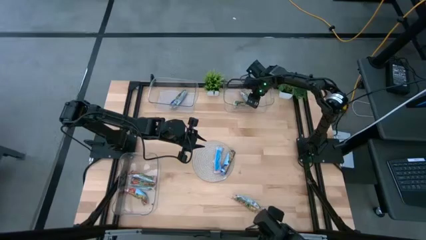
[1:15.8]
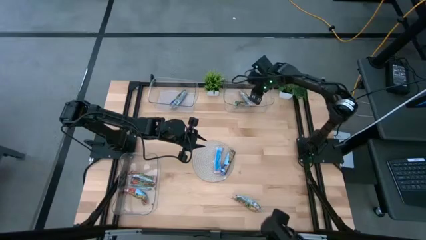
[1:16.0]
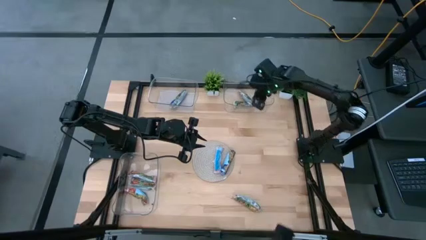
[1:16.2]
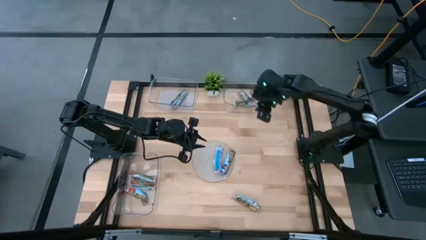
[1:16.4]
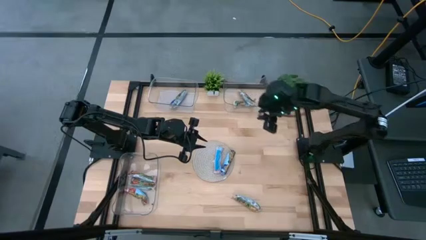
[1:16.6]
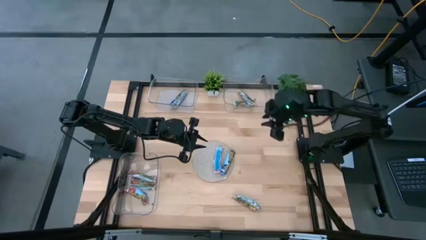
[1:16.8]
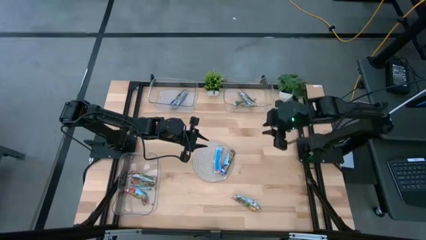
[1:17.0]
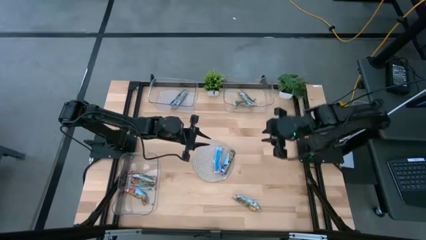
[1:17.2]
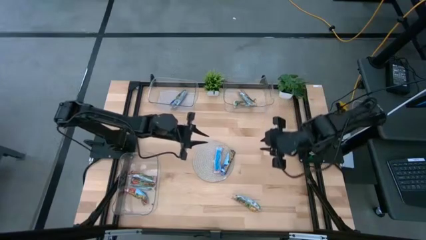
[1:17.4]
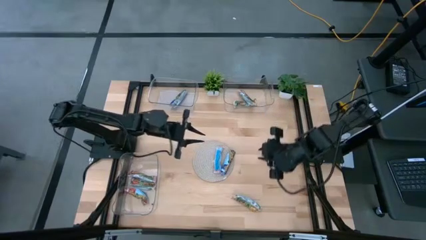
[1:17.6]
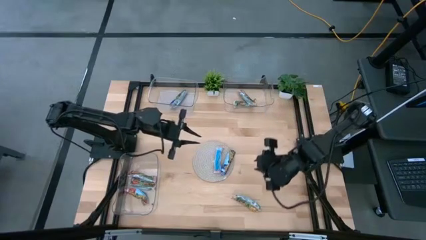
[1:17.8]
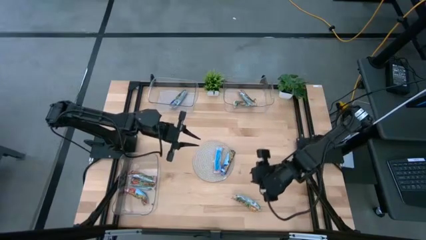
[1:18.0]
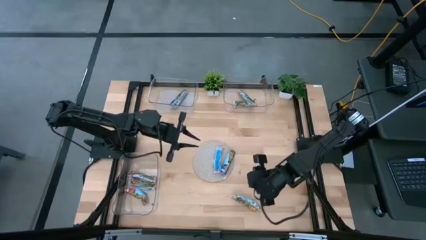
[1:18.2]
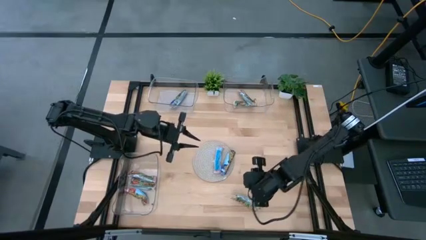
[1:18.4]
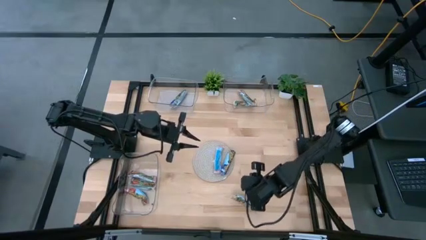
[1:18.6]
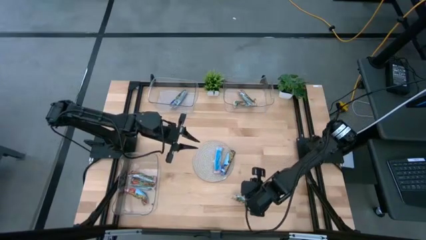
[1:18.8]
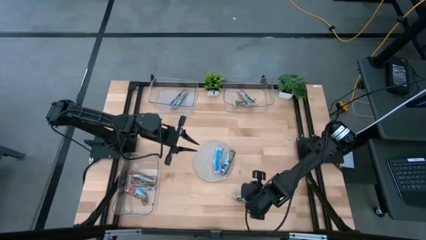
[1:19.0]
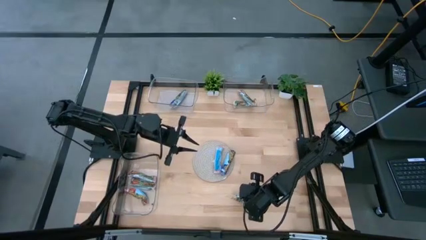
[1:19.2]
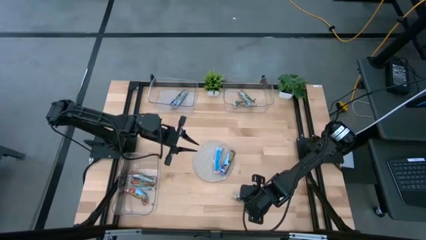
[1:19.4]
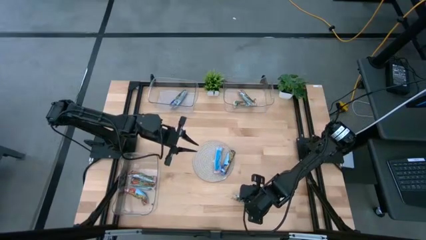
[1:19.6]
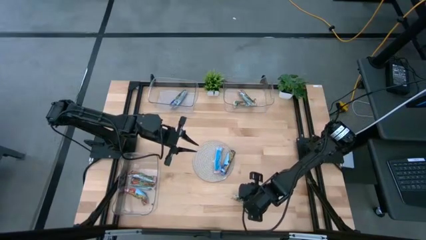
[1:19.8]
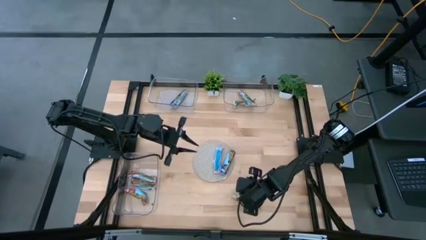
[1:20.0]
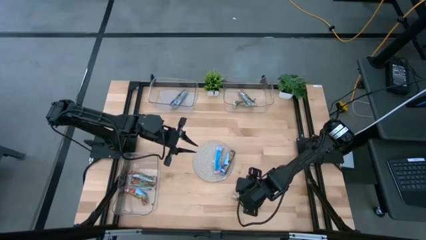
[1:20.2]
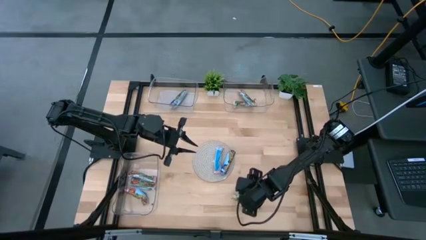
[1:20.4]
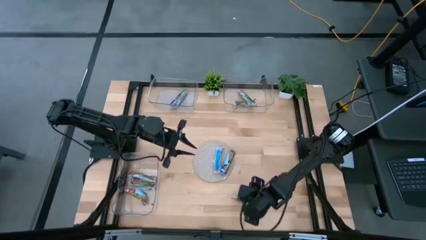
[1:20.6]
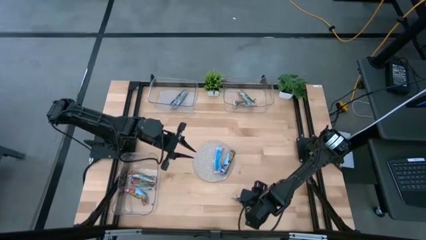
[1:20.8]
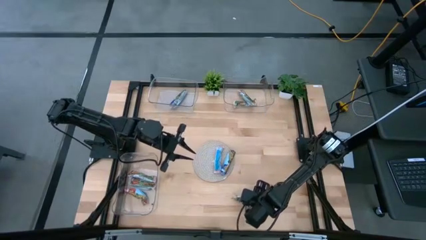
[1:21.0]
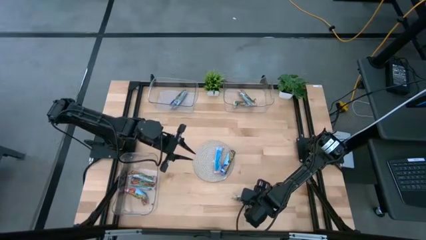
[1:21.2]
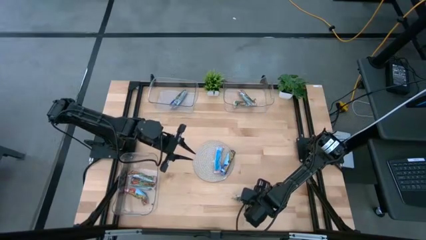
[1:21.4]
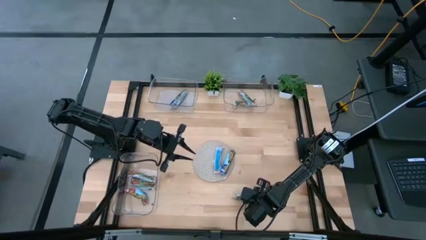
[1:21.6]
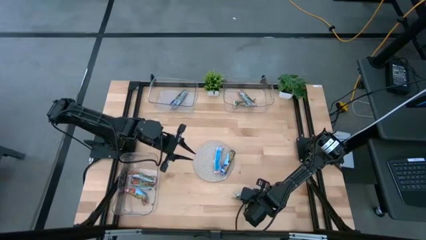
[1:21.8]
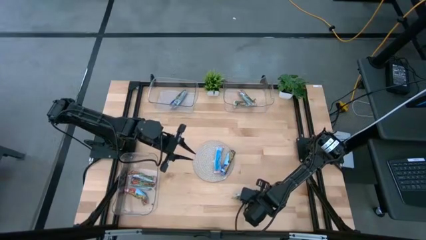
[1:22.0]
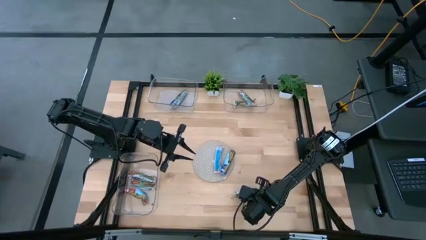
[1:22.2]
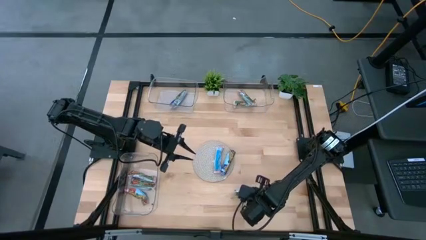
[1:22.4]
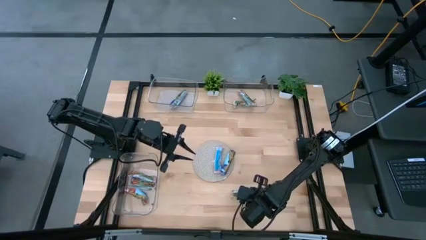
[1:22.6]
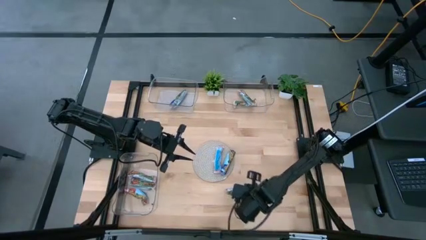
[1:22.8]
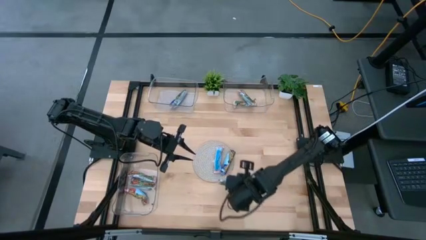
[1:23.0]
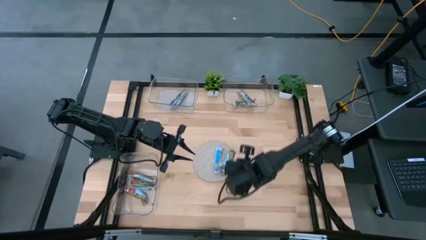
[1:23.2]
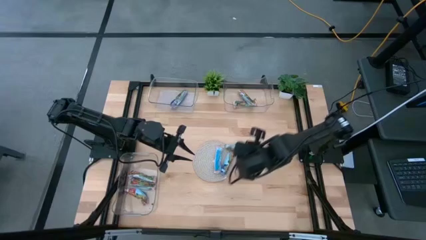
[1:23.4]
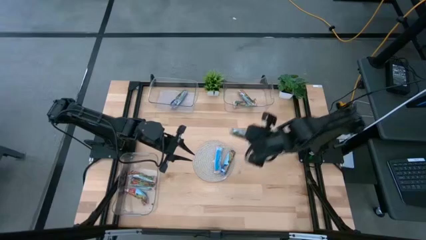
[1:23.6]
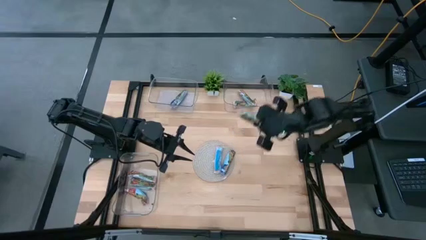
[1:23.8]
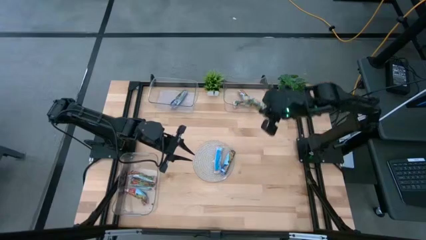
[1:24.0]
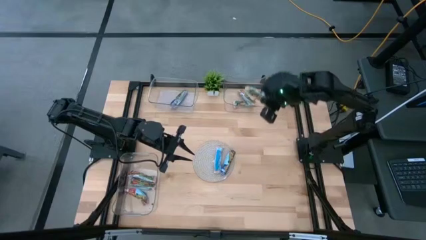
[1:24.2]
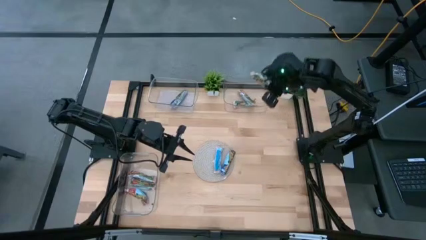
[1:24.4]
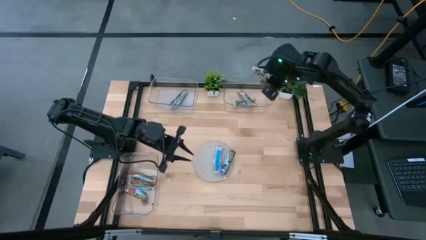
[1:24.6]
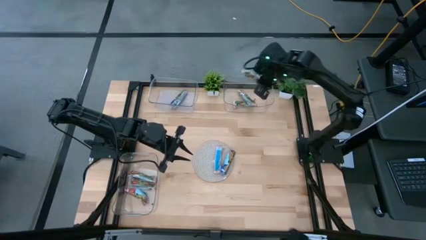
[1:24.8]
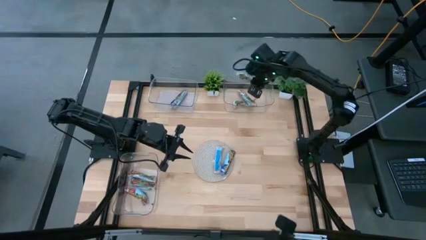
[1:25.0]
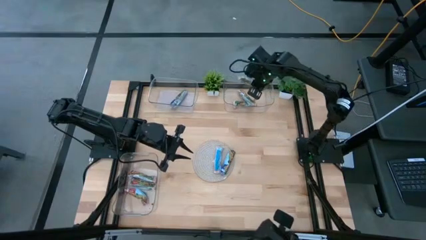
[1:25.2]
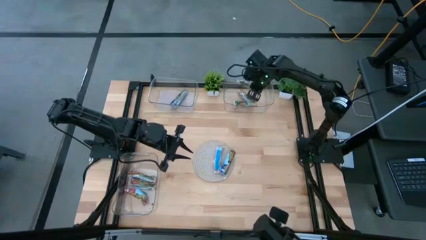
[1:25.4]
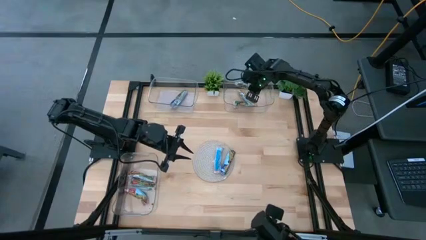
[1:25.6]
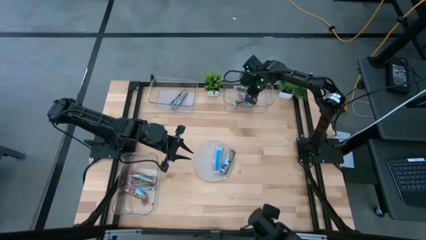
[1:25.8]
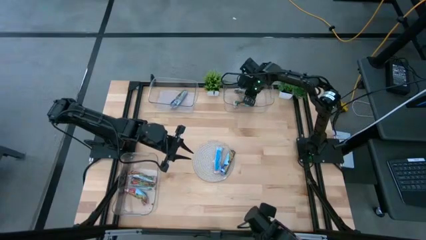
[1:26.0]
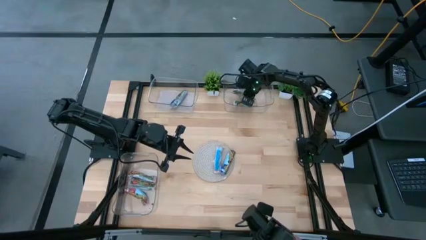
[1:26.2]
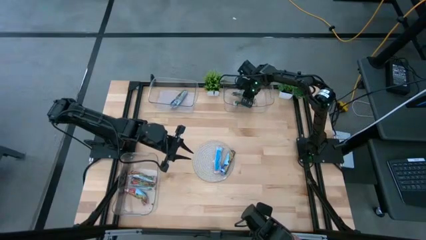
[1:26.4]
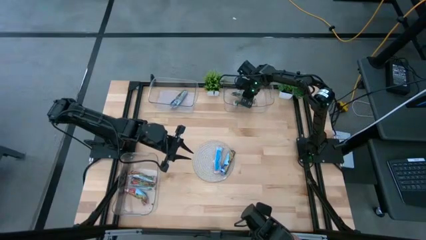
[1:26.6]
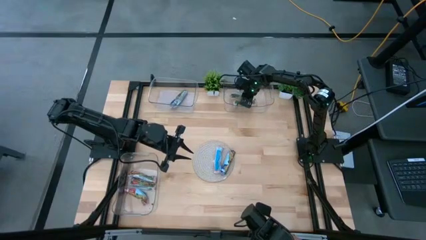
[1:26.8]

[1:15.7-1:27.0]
Task: Pick and place Granola Bars by type
Put the yellow granola bar into the top right transparent bin
